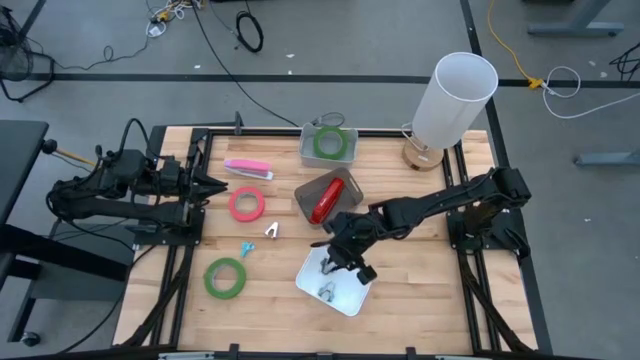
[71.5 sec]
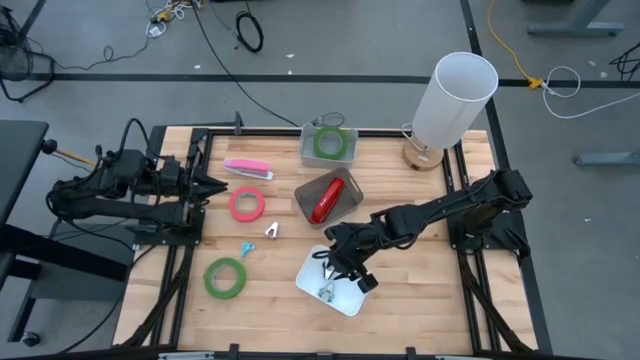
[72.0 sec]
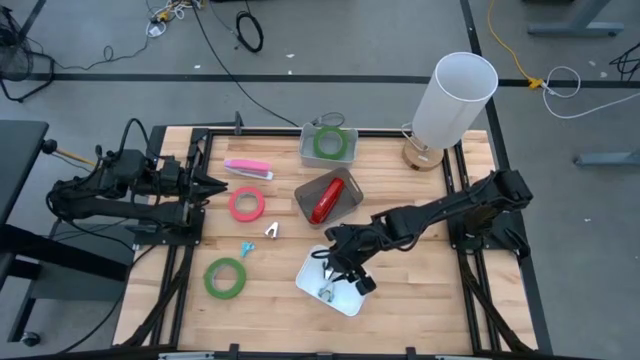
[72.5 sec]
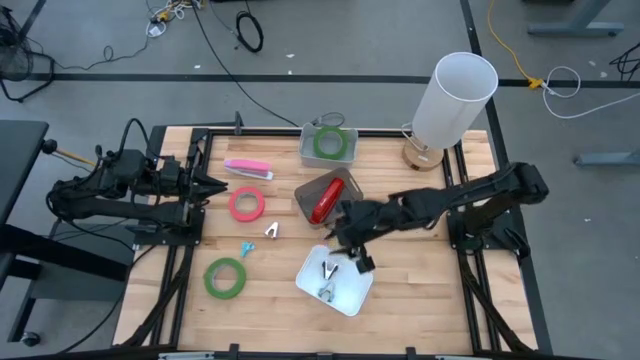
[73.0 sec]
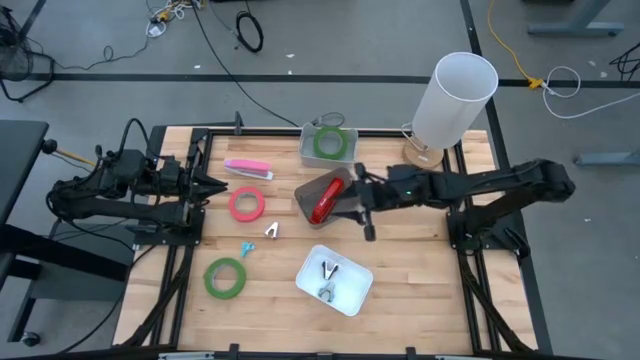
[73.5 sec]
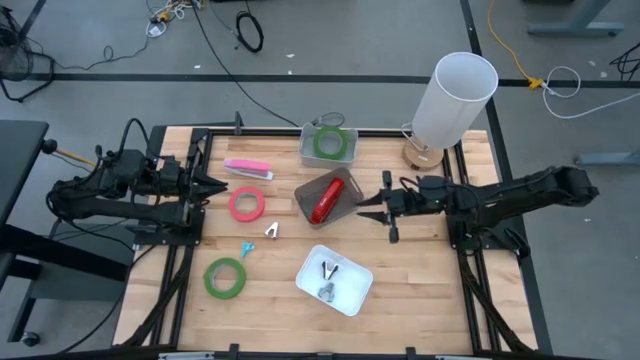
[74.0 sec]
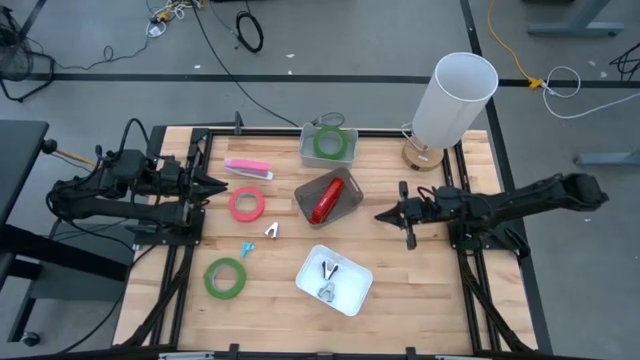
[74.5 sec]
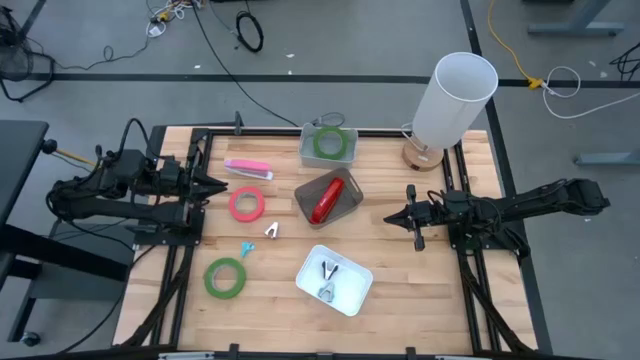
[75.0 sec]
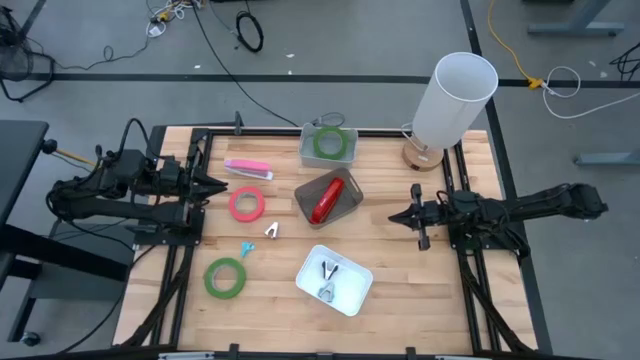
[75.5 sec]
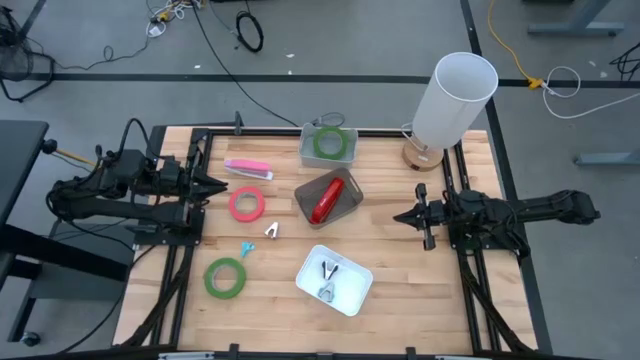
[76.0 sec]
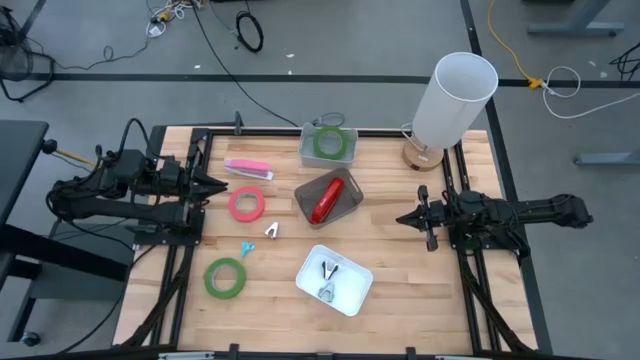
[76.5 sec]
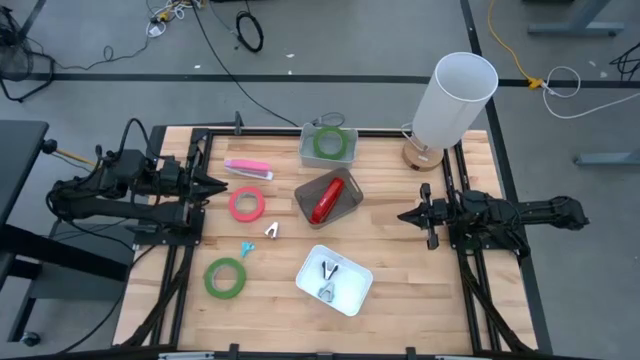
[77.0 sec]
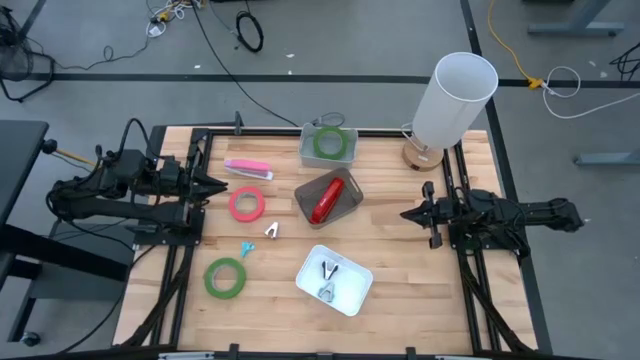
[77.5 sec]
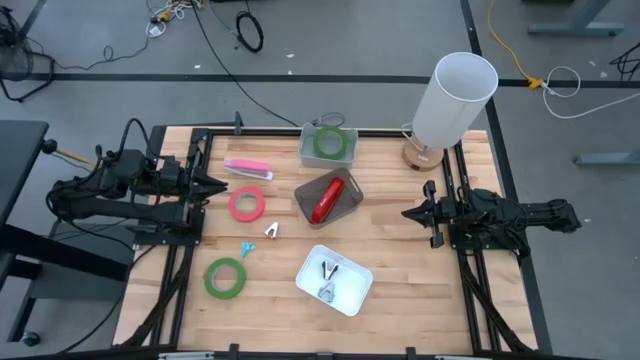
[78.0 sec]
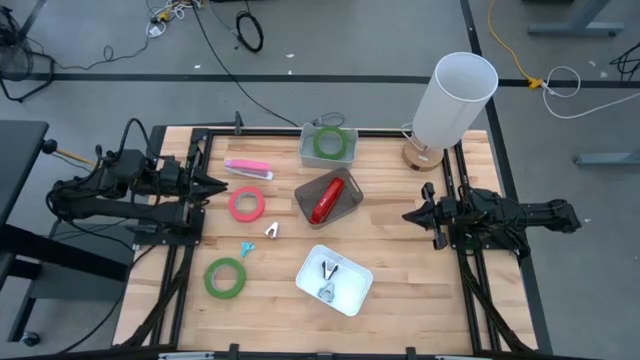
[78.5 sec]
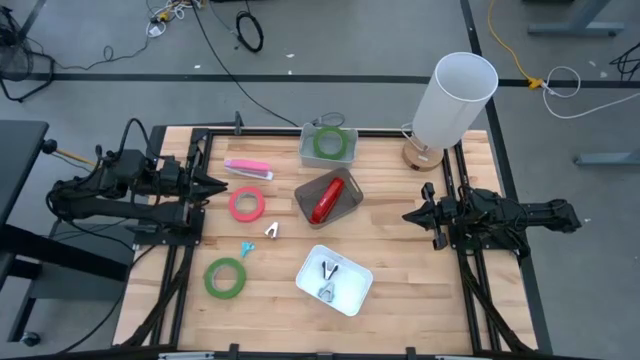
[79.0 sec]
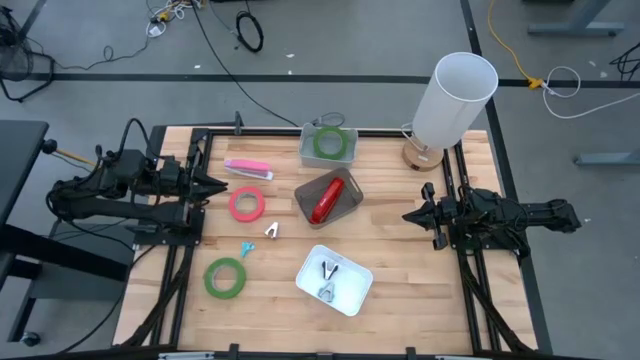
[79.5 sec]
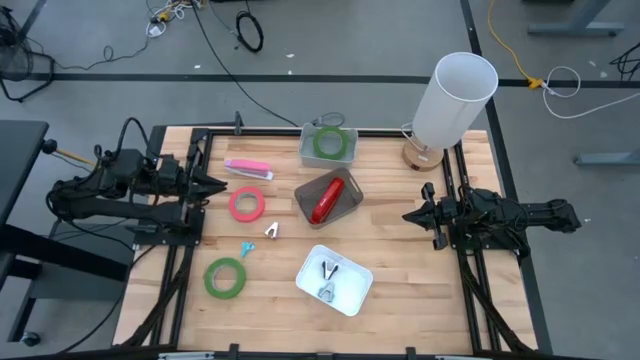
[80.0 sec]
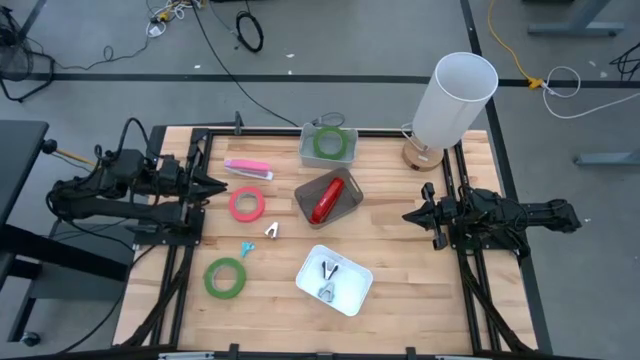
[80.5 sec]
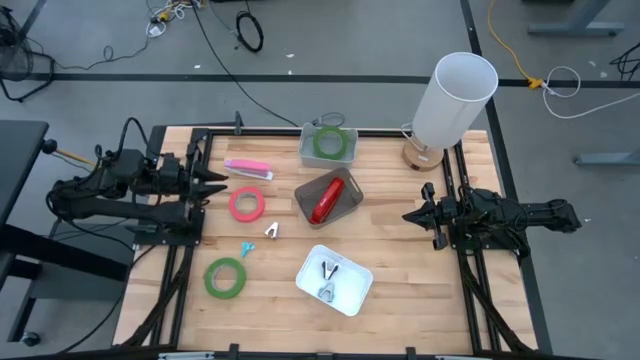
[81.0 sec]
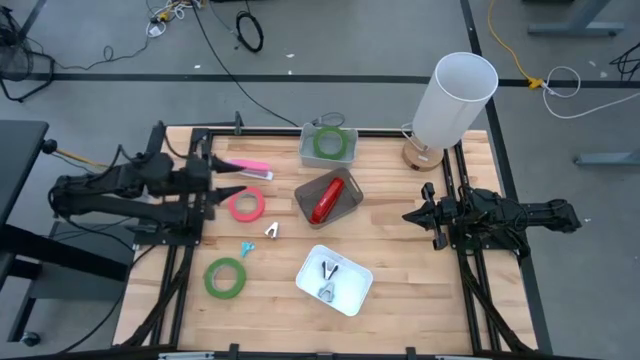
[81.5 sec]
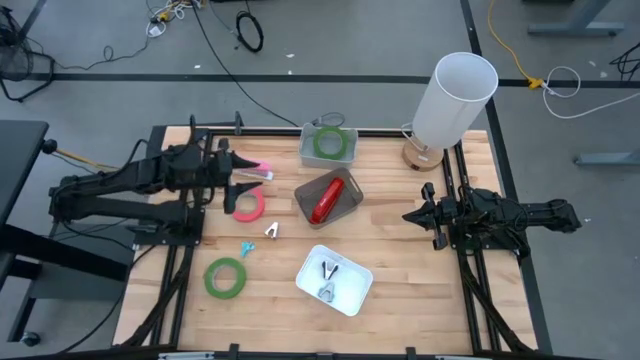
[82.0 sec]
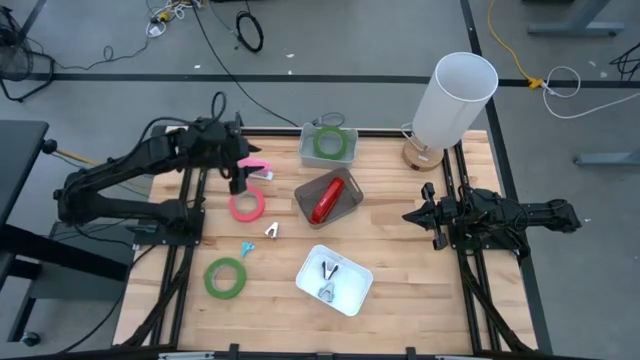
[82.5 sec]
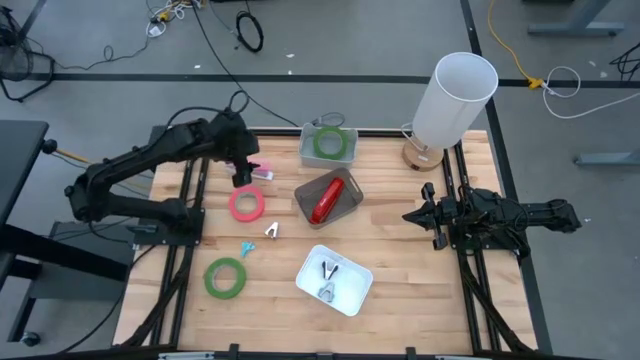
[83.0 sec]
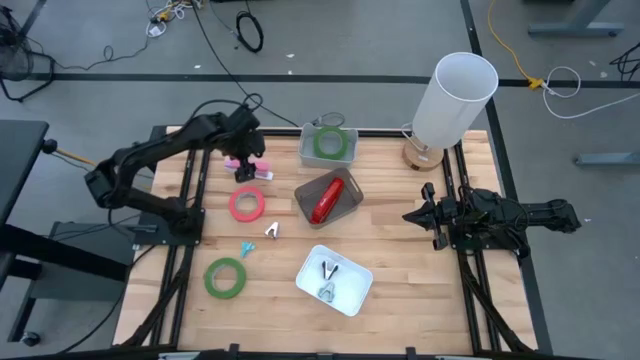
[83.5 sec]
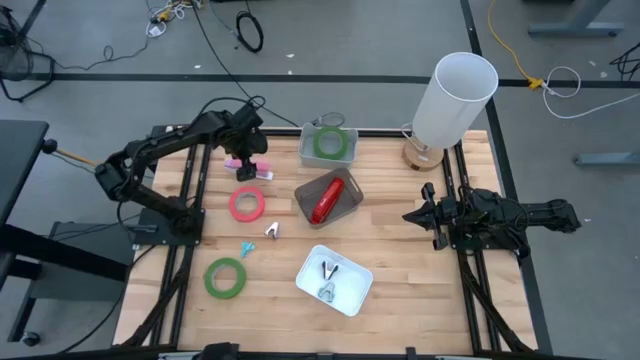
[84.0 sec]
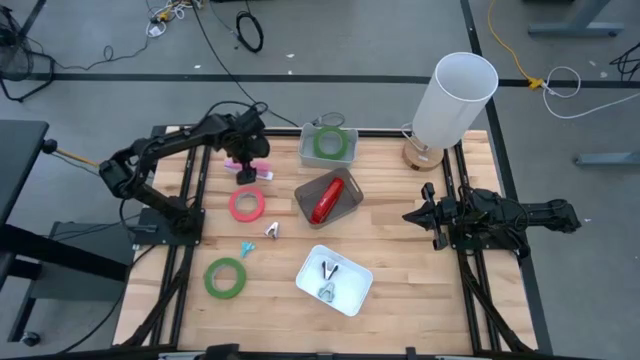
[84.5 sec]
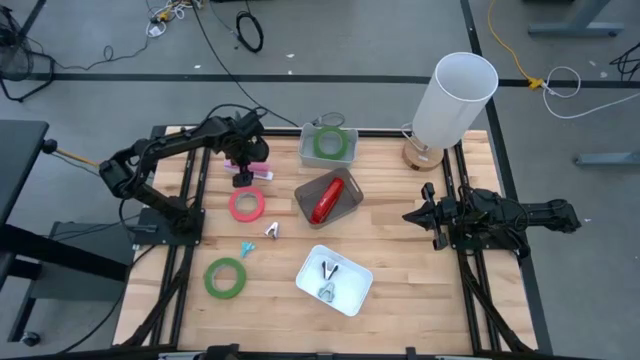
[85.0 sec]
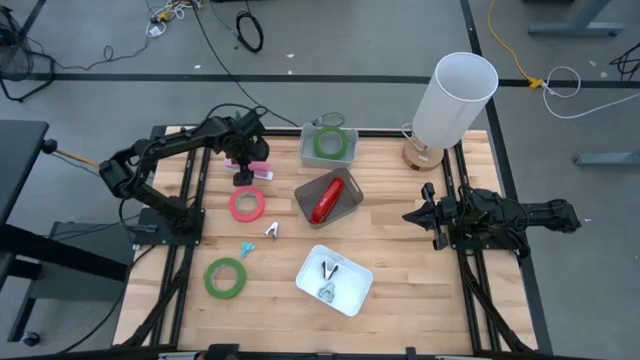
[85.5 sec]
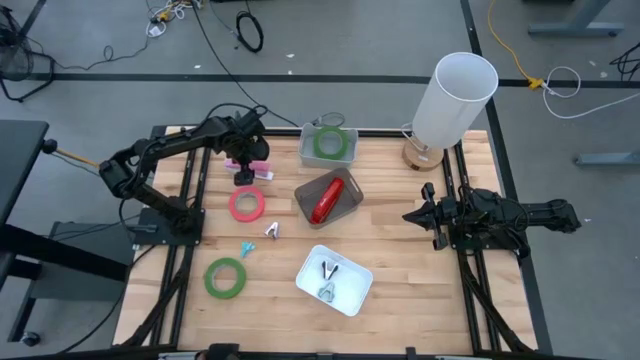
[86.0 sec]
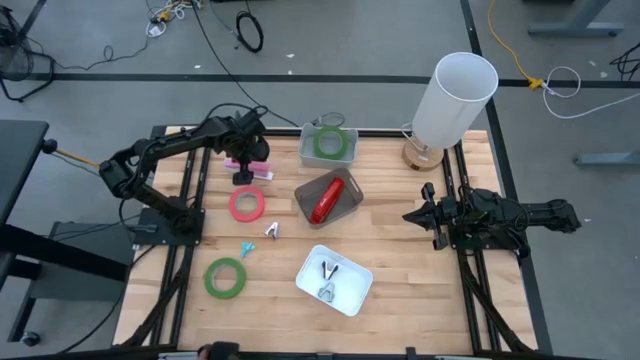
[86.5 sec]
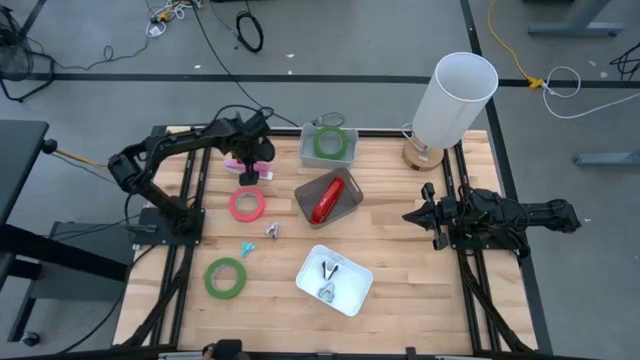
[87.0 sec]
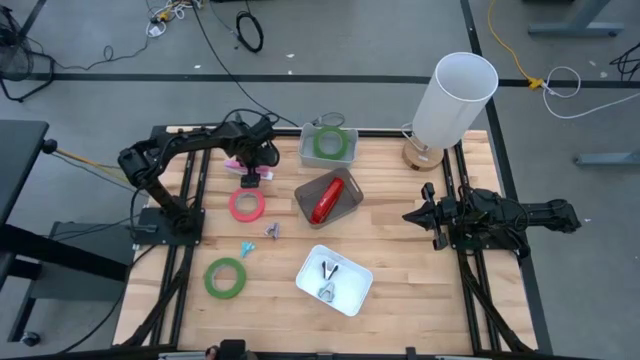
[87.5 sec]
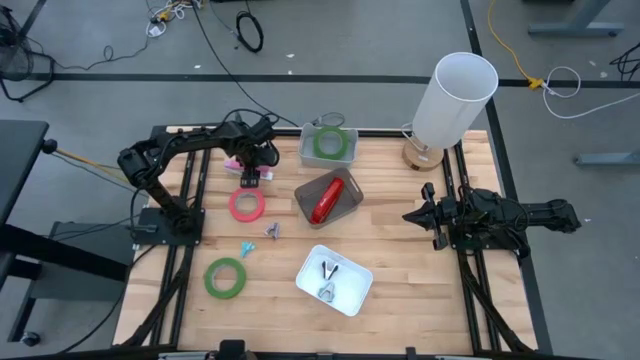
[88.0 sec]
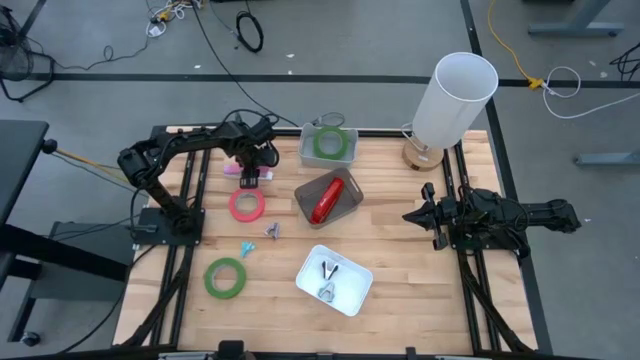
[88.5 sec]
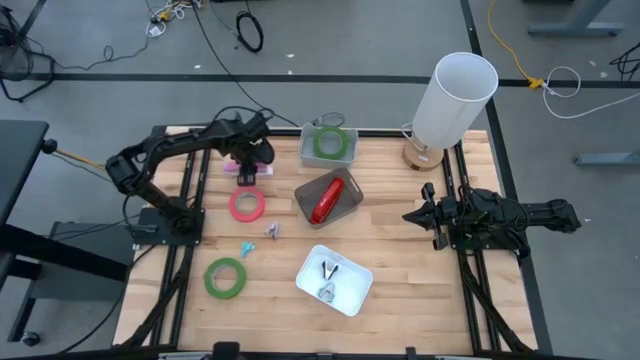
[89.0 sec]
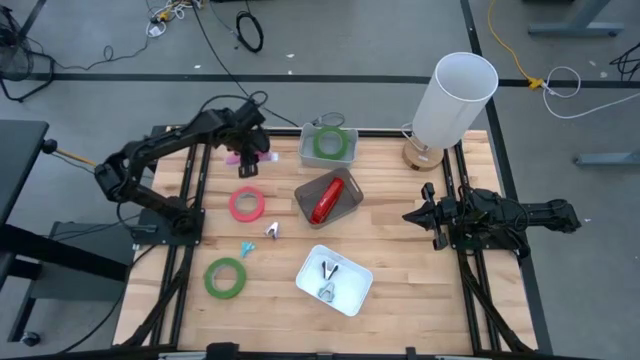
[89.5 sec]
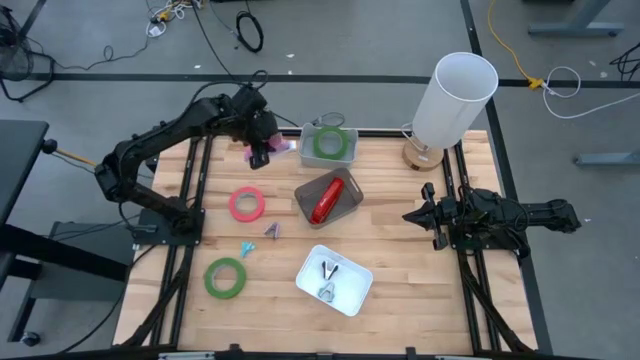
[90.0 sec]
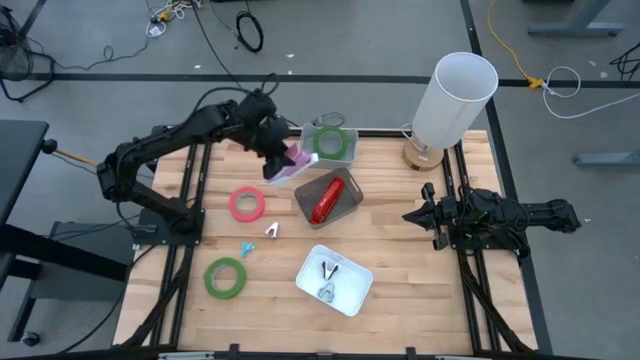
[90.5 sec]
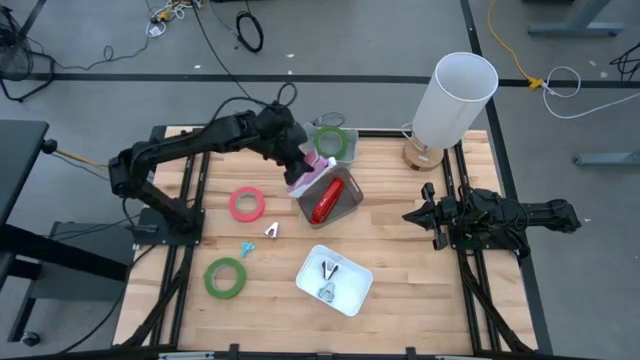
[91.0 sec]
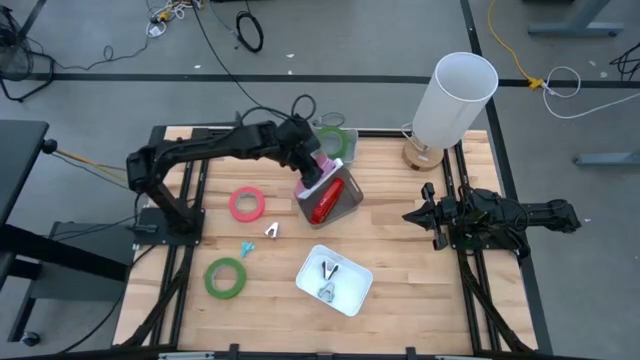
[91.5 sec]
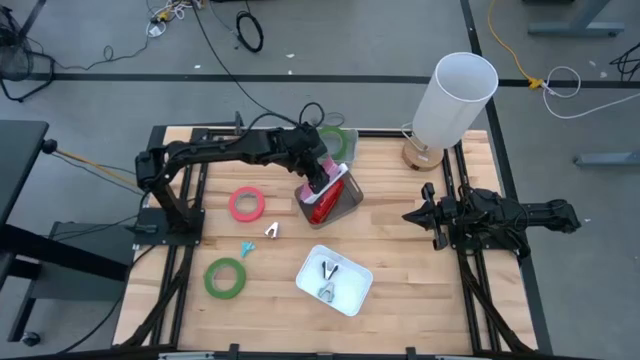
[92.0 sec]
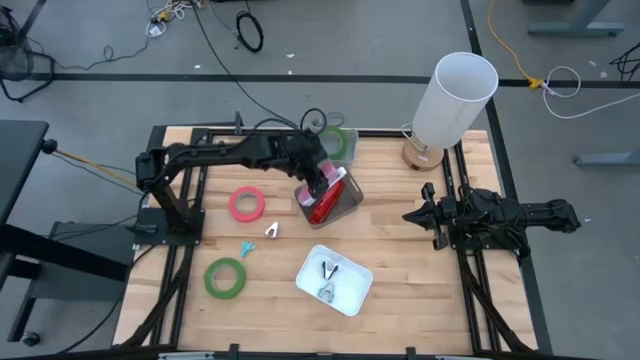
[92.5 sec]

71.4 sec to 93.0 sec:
Task: Pick and place Stapler, Stapler remover, tape
Put the pink stapler into the black bin
